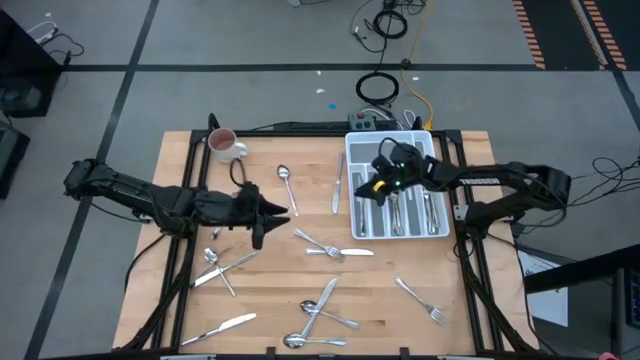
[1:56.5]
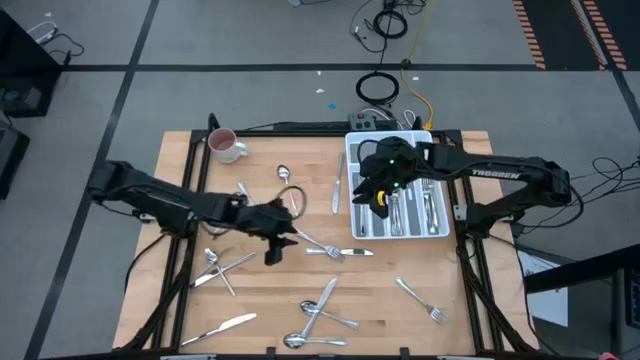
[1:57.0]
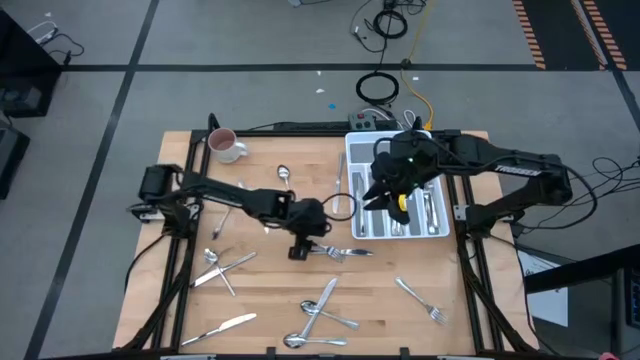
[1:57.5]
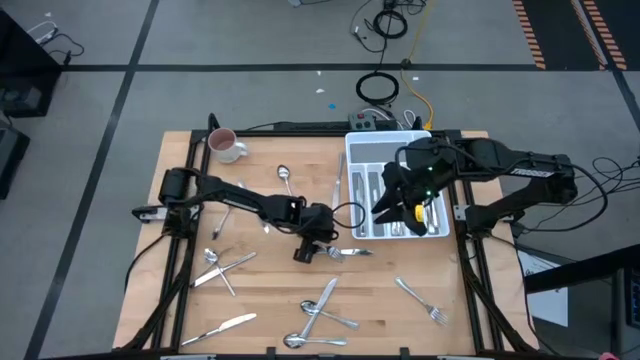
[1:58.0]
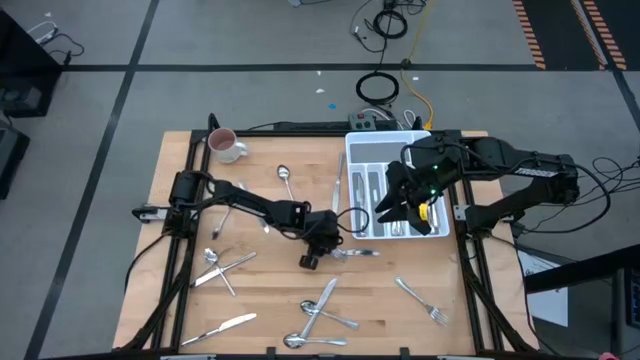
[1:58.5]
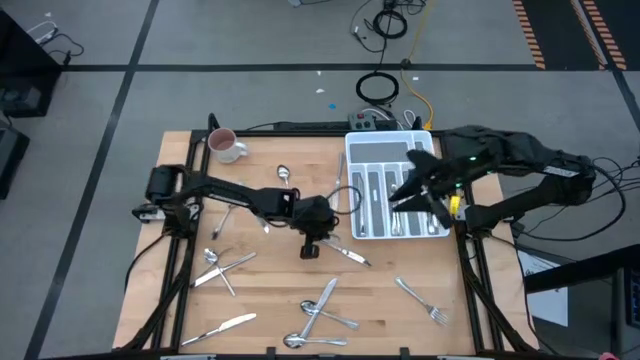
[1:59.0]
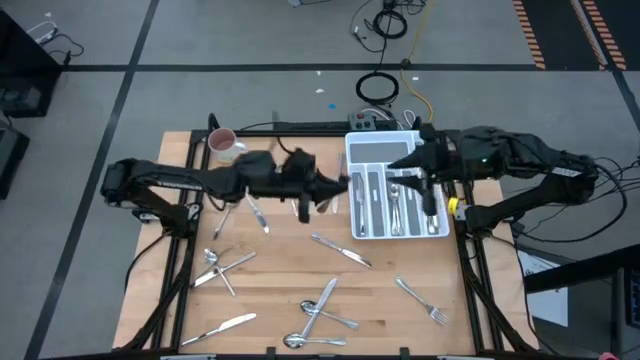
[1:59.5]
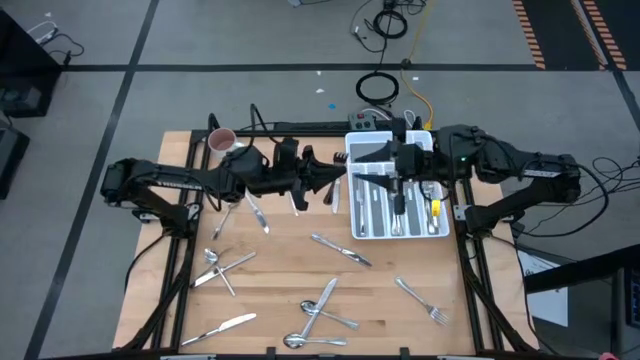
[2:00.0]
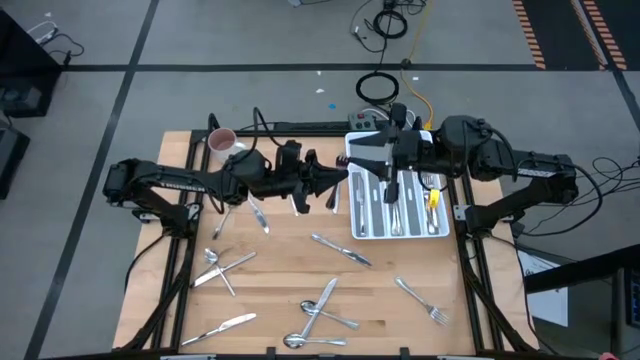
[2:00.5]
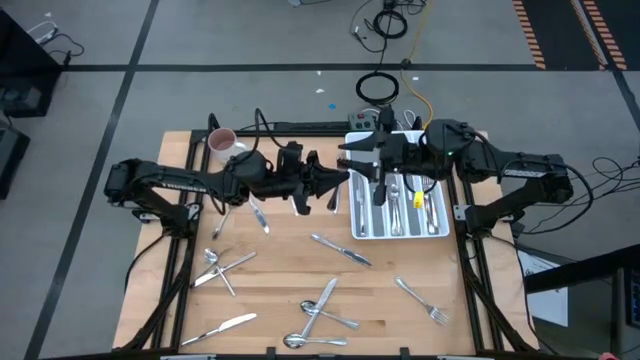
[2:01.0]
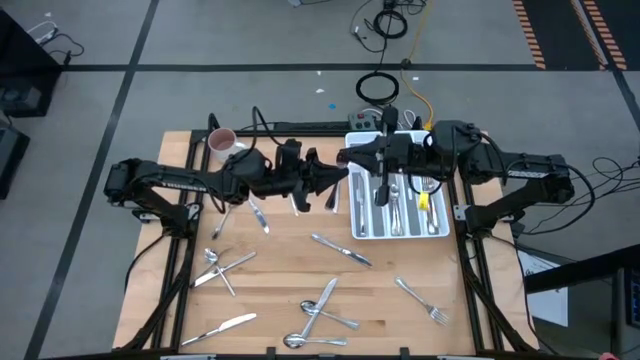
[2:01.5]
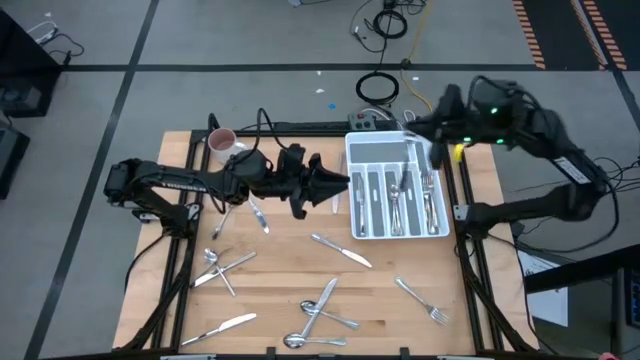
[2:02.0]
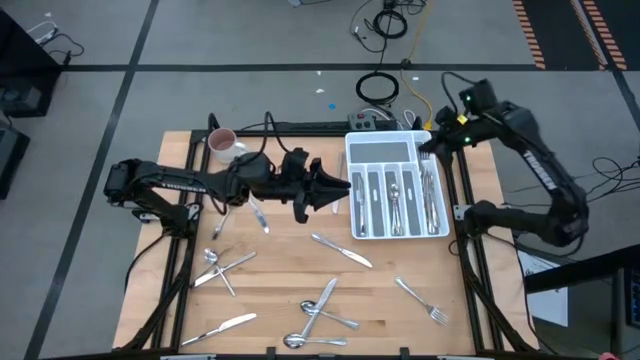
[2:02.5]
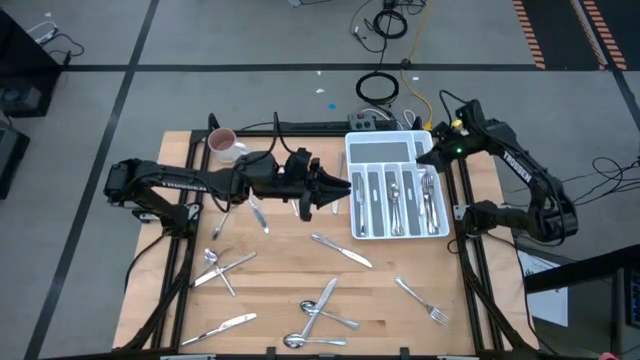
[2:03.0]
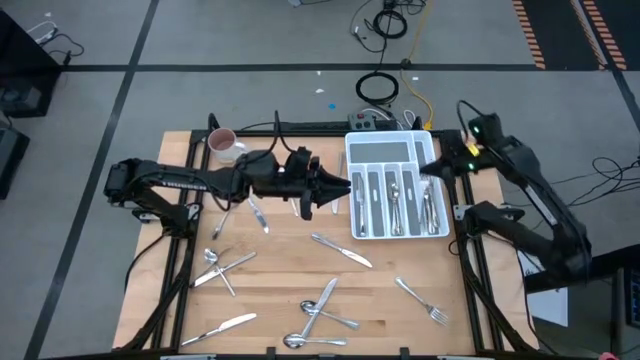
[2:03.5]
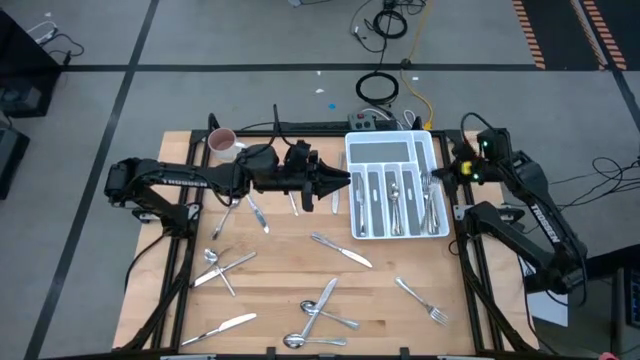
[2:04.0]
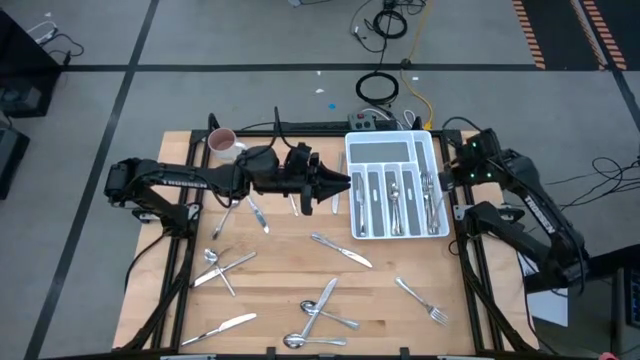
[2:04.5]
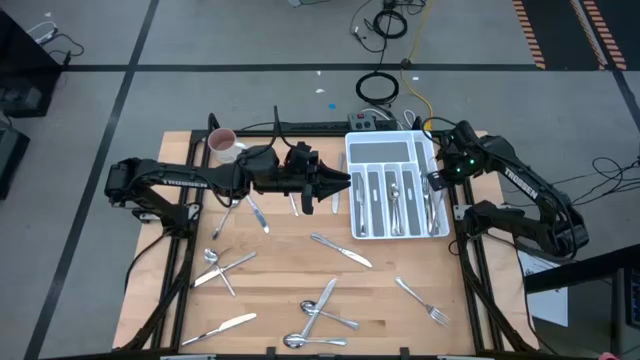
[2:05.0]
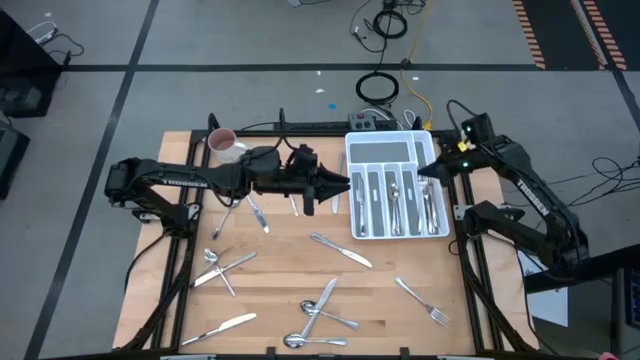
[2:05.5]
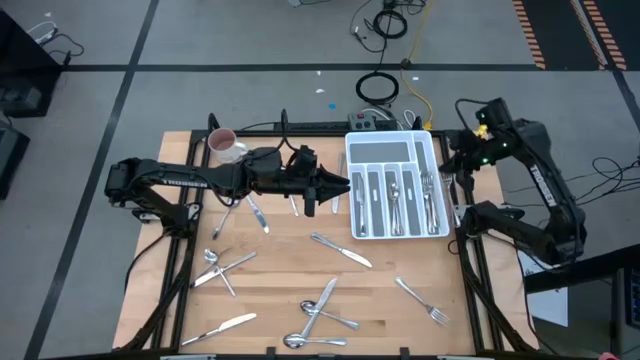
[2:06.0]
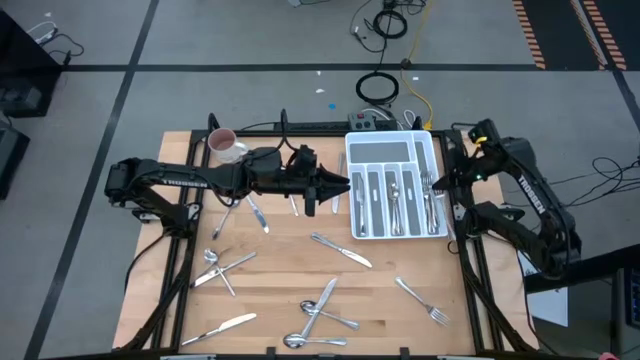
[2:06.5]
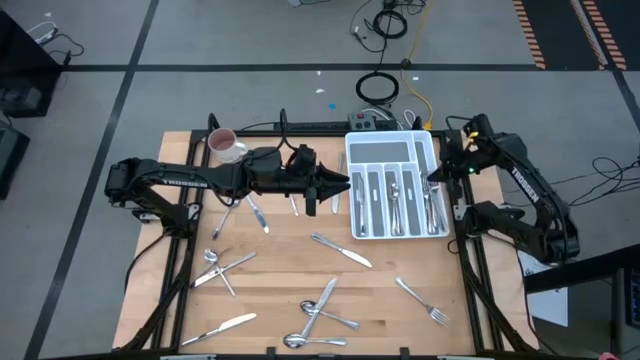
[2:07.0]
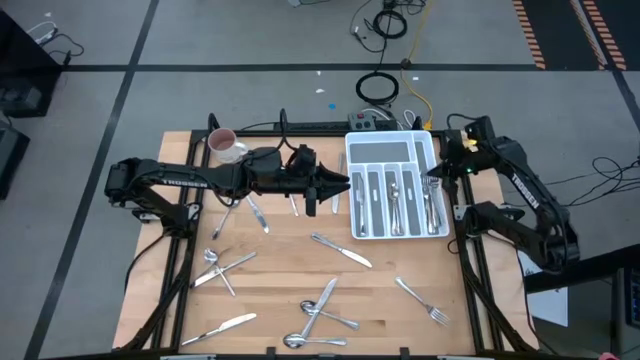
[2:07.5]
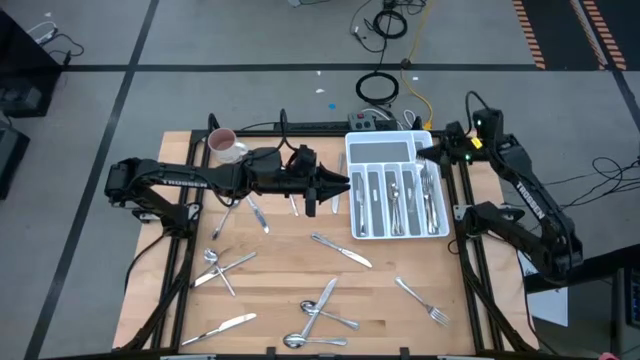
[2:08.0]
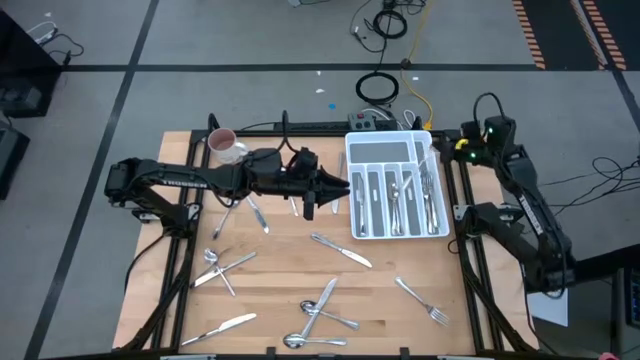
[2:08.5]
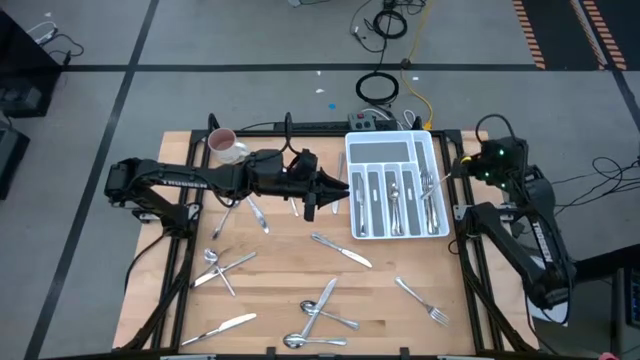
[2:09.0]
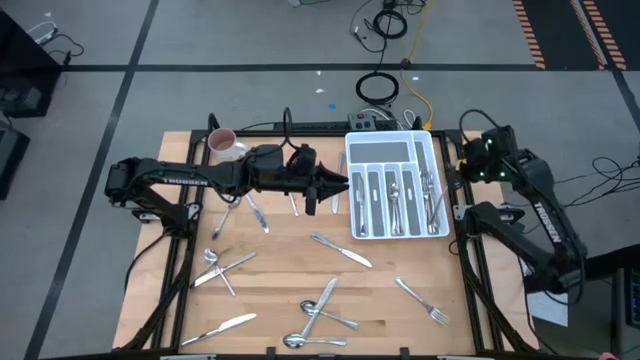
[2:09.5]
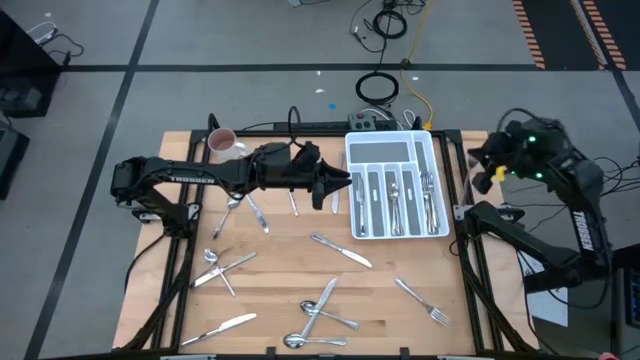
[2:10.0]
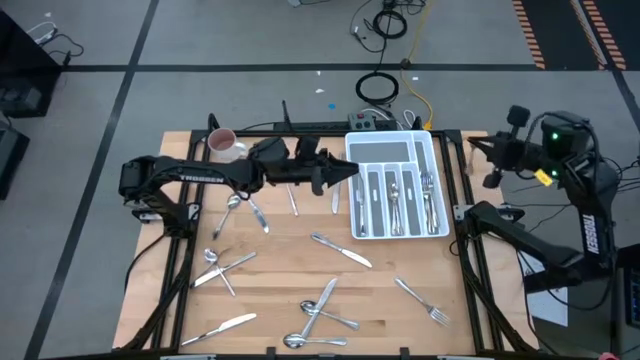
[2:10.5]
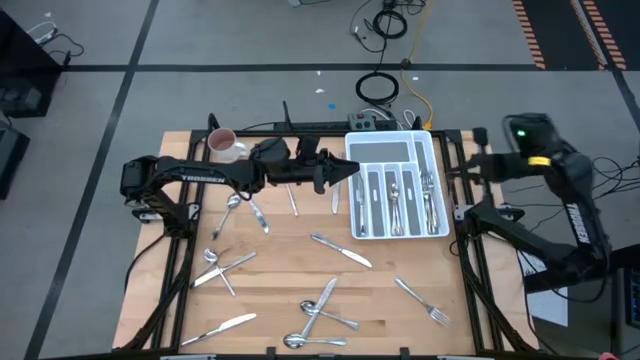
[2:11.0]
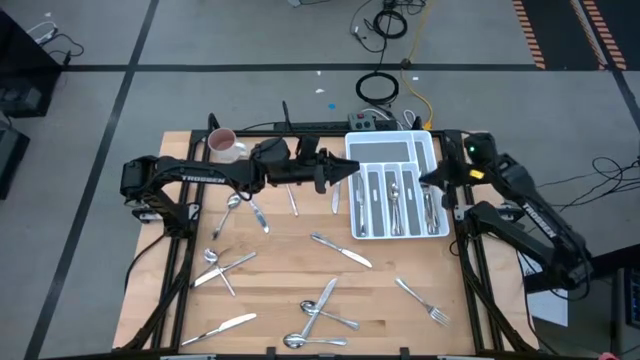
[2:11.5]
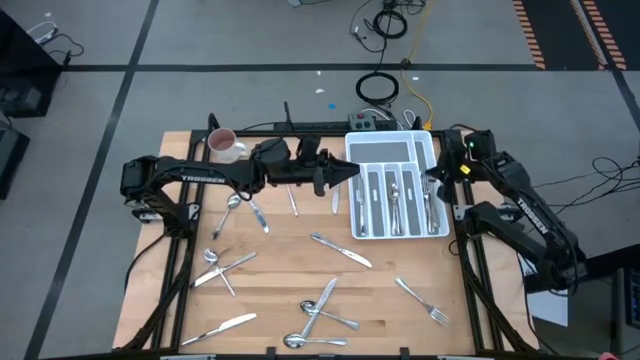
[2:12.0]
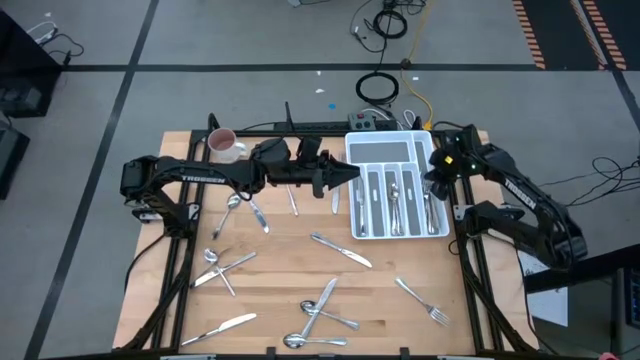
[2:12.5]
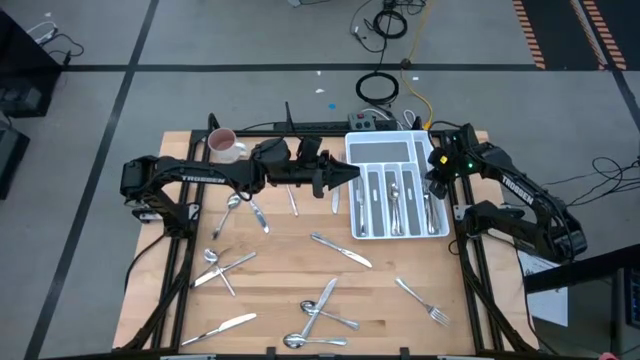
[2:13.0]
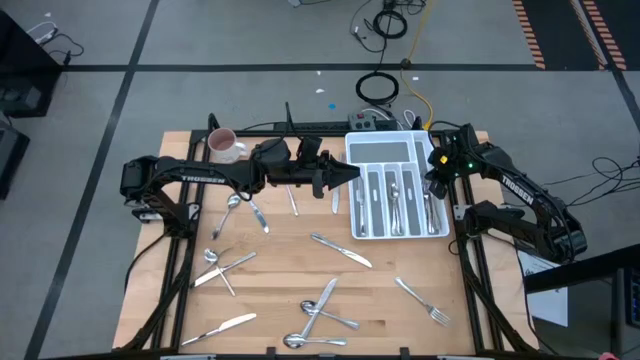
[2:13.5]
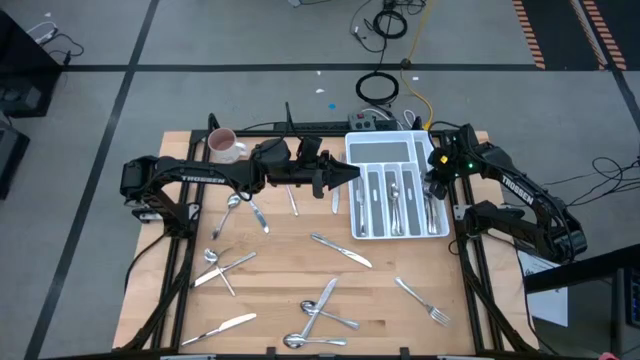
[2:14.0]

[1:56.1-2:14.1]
Task: Sort silverware
Put the middle fork in the right section of the silverware tray

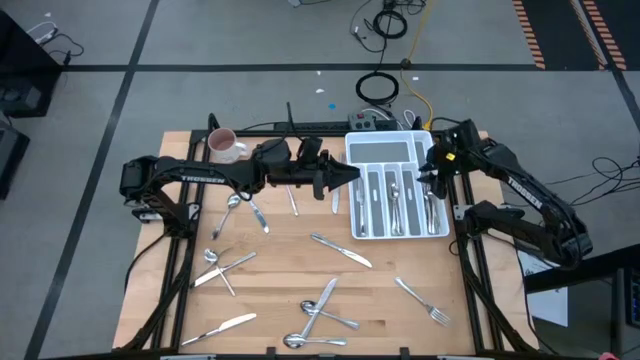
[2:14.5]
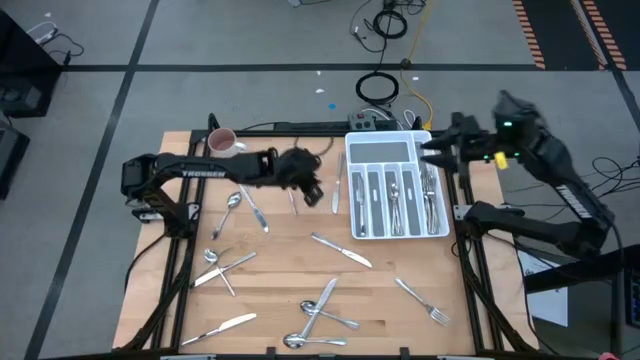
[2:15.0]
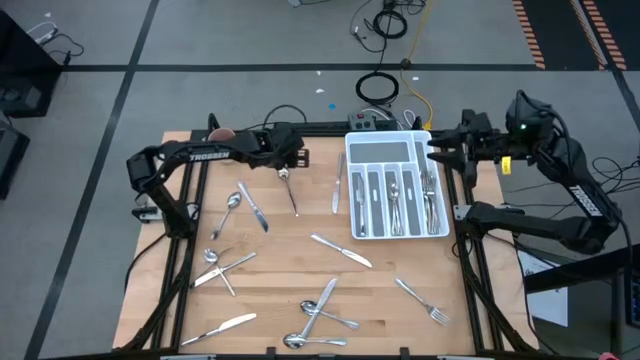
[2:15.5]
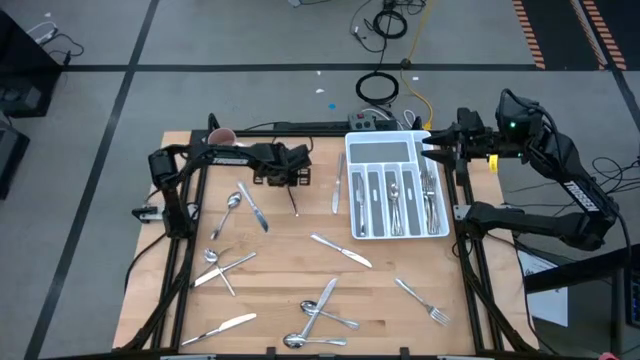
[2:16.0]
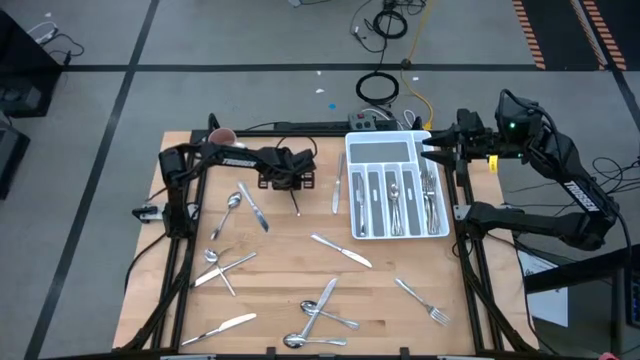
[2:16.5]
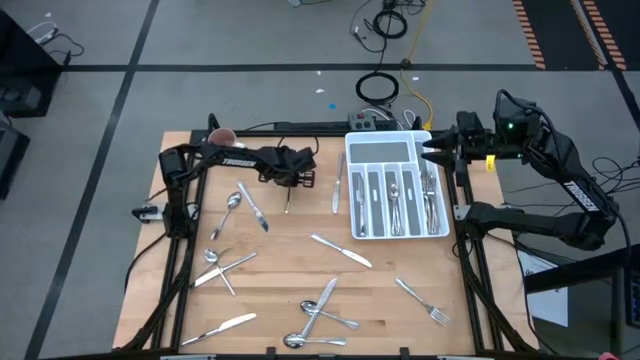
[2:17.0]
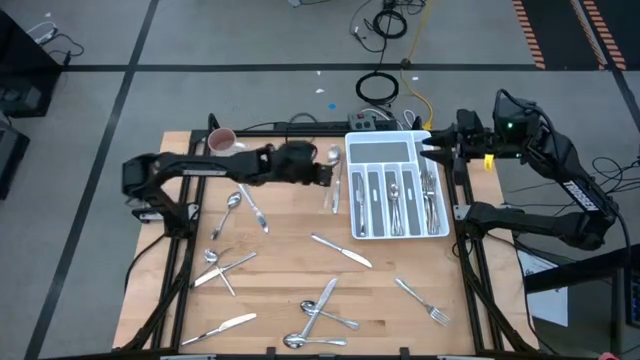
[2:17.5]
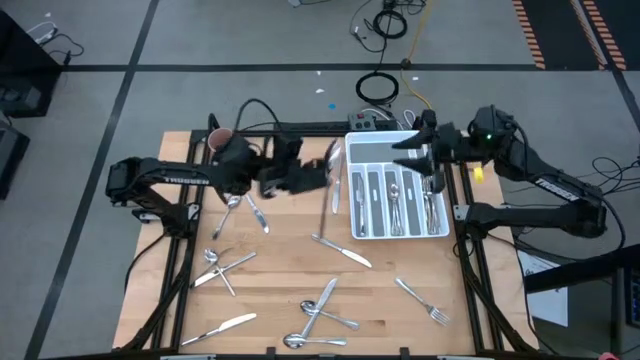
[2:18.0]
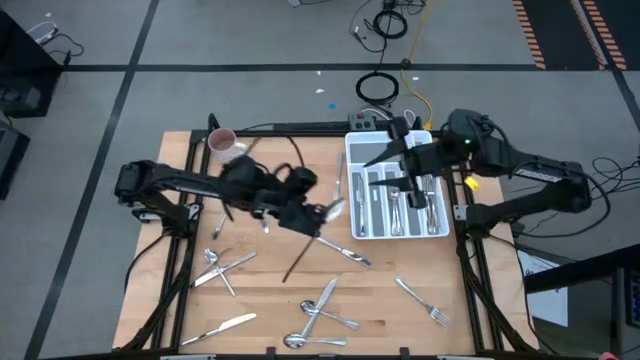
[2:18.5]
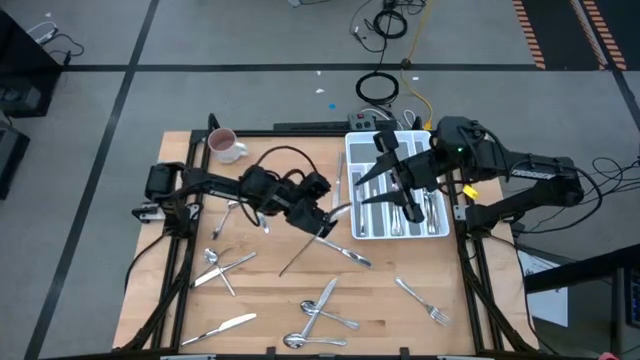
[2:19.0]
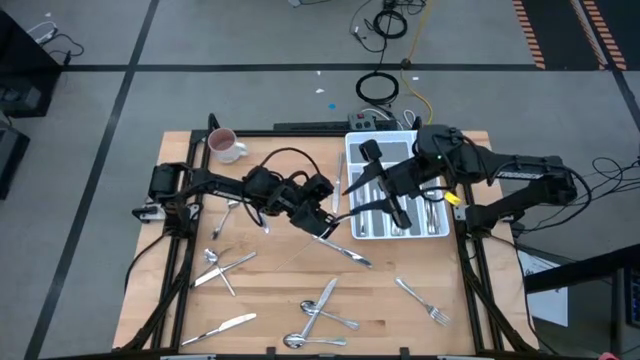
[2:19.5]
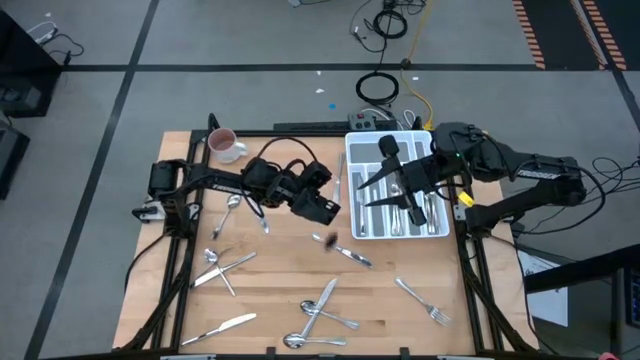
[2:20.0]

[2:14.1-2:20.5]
Put the spoon in the middle section of the silverware tray
